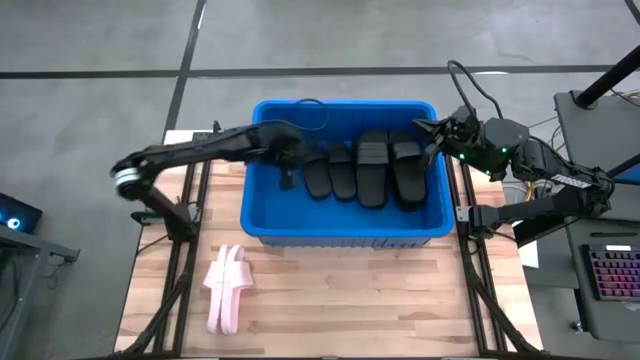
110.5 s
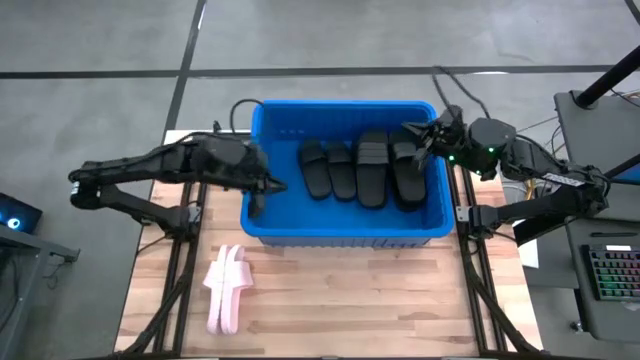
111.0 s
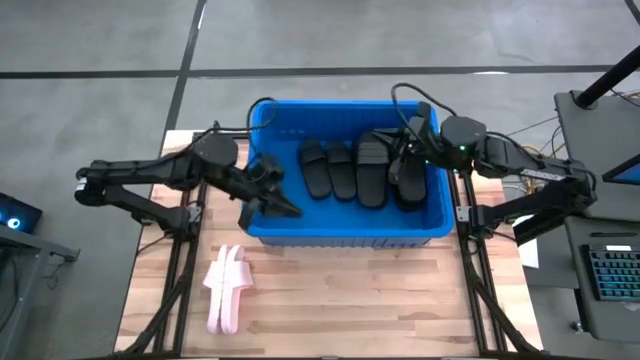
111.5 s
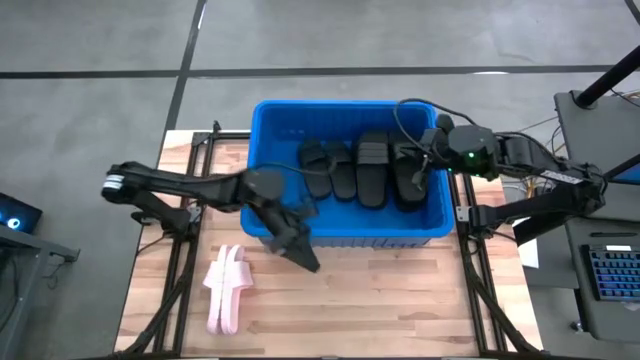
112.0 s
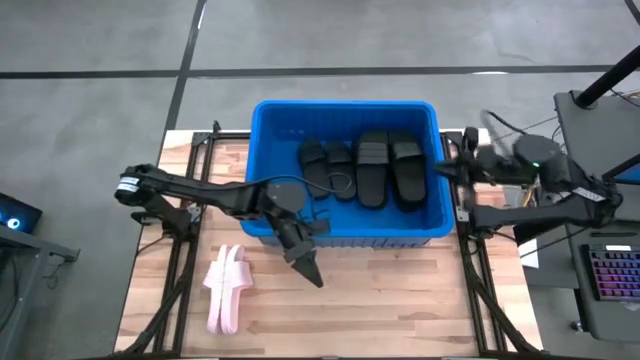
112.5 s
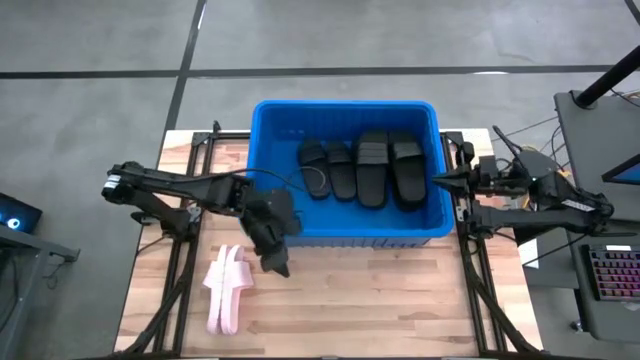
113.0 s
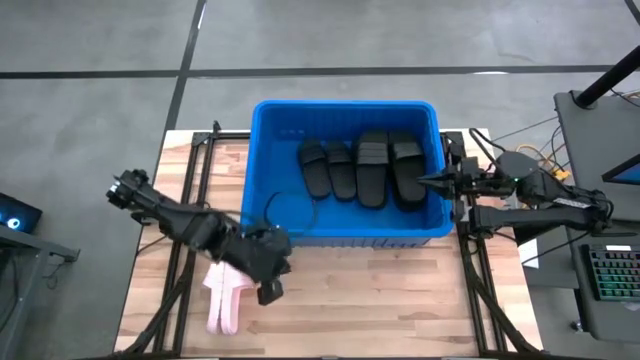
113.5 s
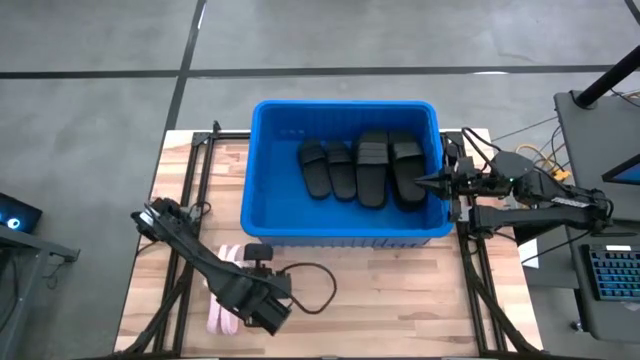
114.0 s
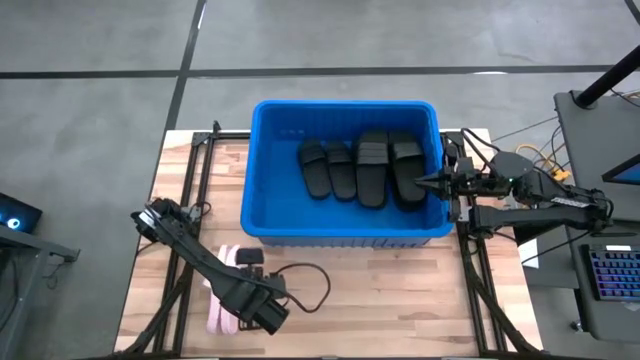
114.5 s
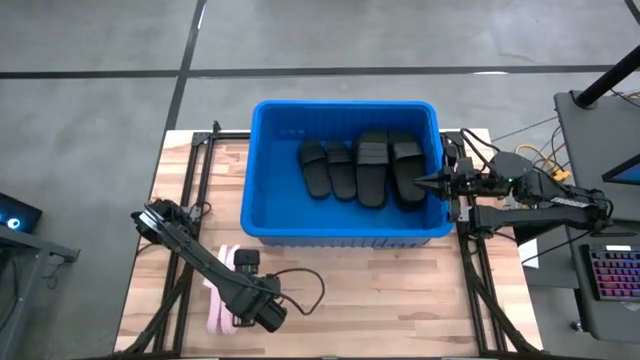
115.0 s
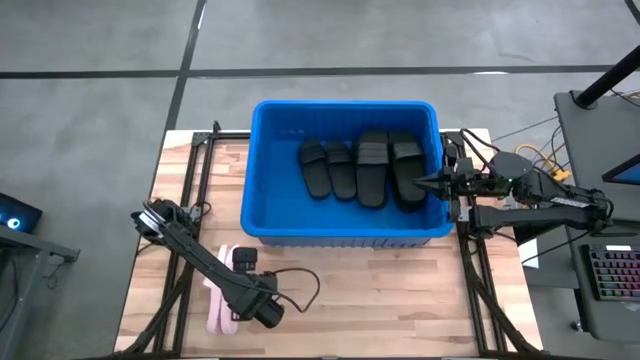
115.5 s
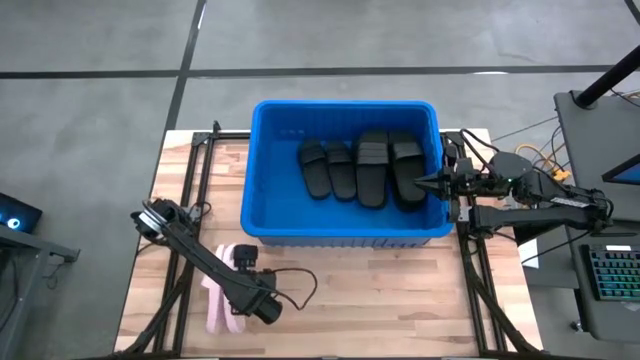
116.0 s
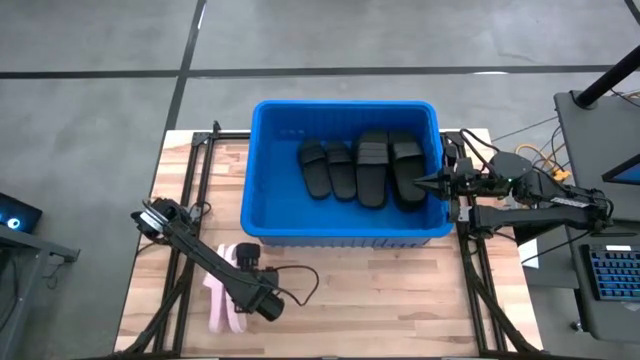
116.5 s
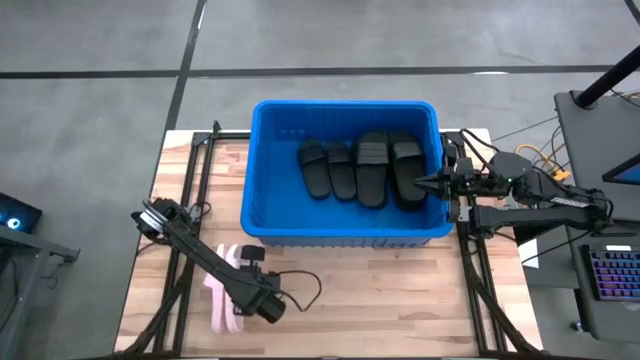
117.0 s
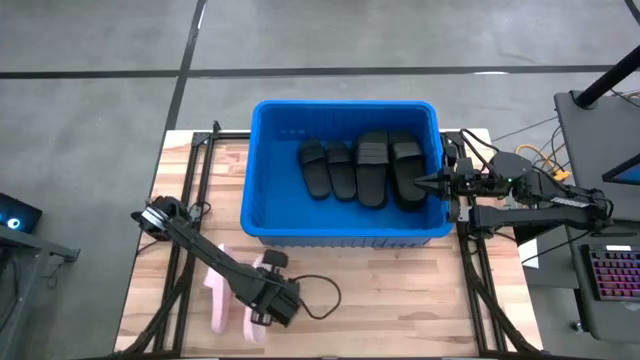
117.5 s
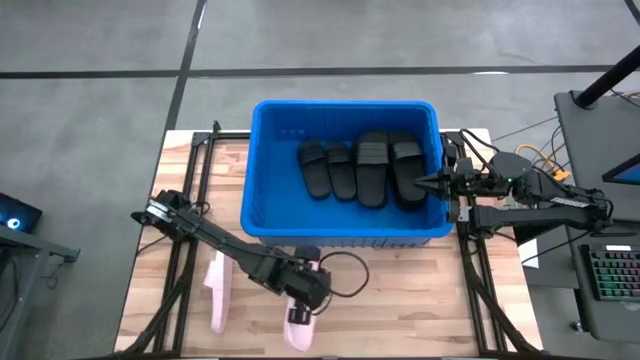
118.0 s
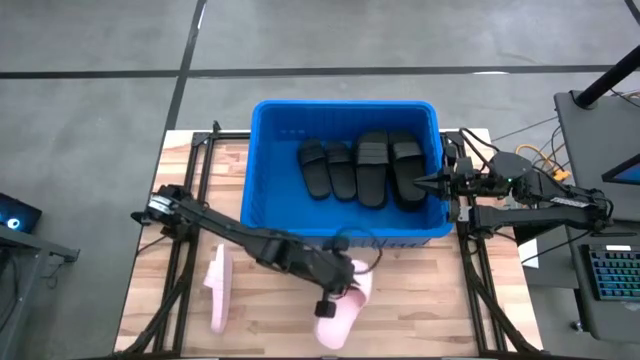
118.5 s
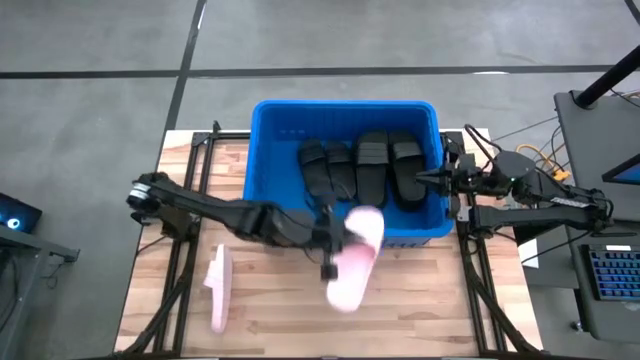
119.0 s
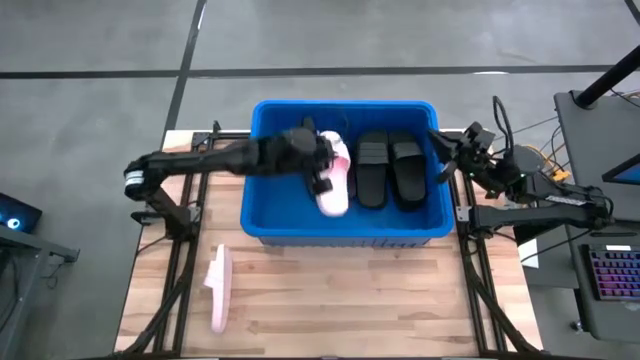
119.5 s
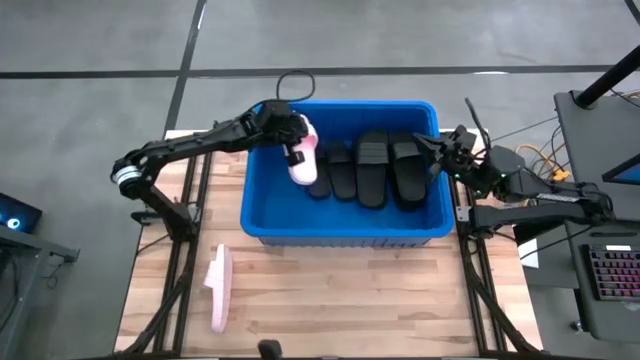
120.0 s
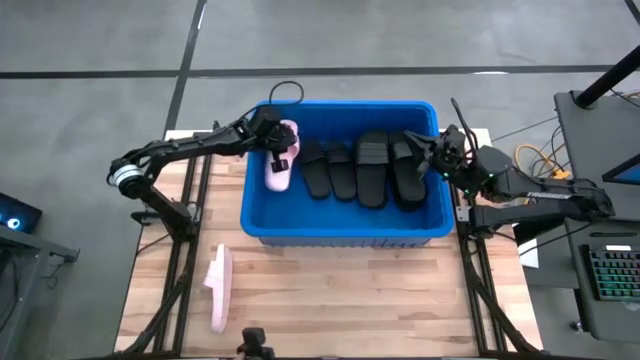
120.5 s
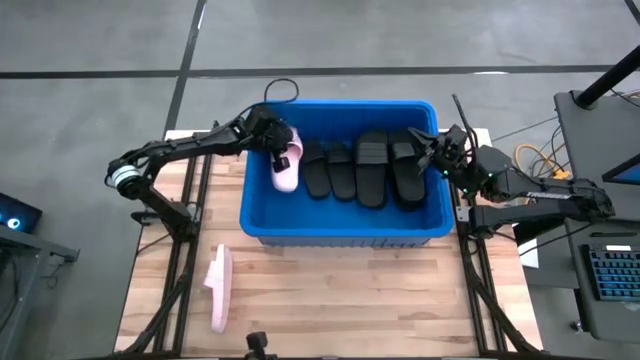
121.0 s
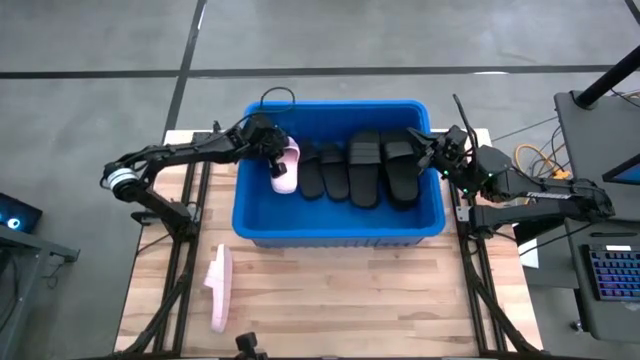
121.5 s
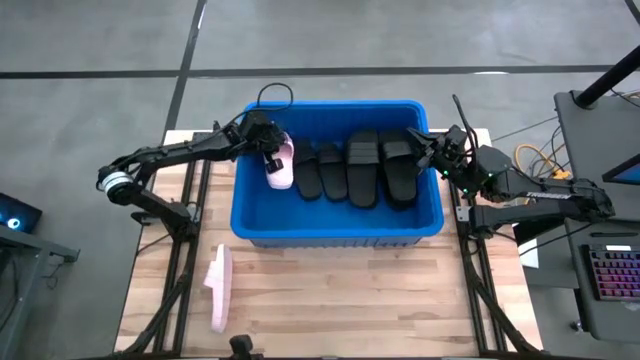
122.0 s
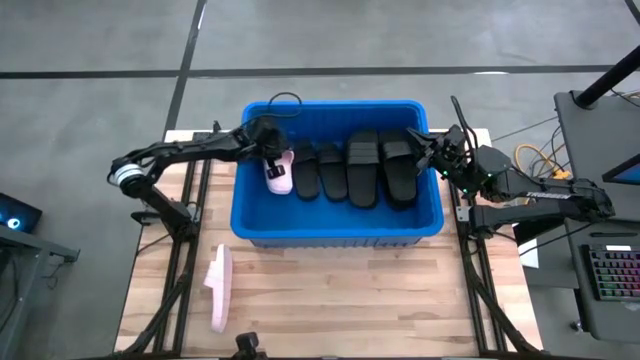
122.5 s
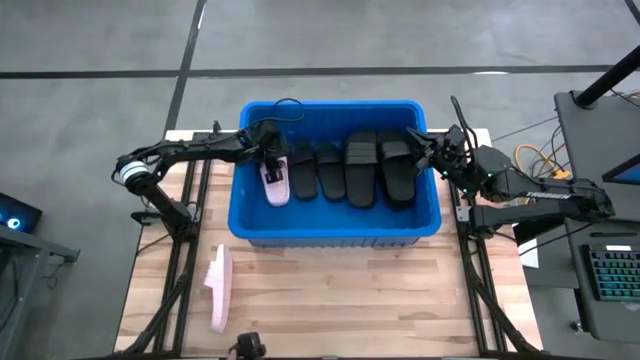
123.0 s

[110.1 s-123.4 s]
Task: Pick and place slides into bin
Put the right pink slide into the bin

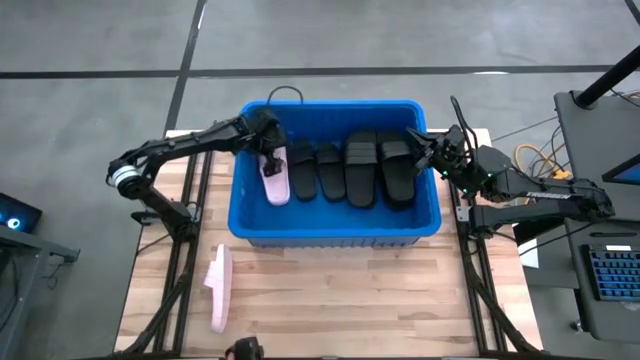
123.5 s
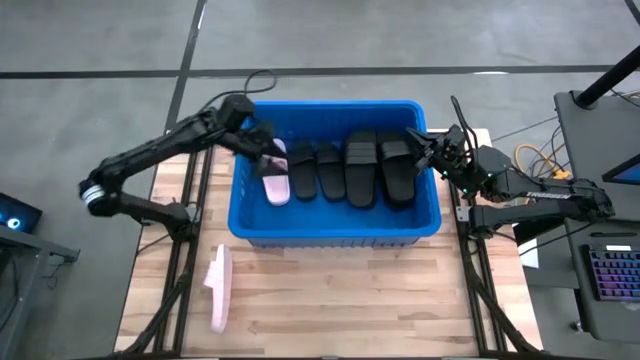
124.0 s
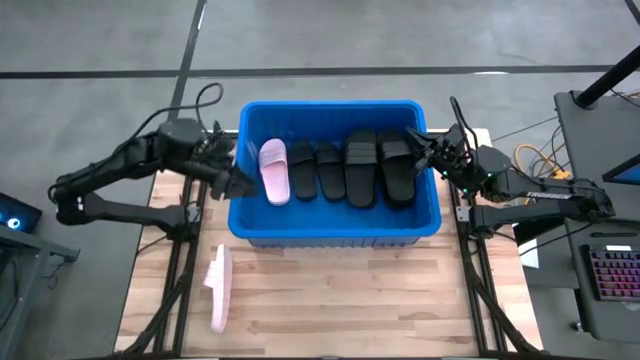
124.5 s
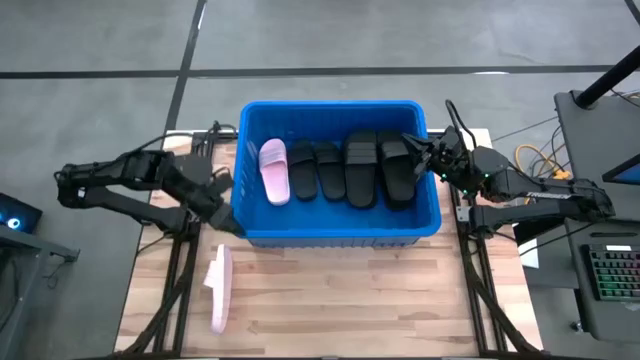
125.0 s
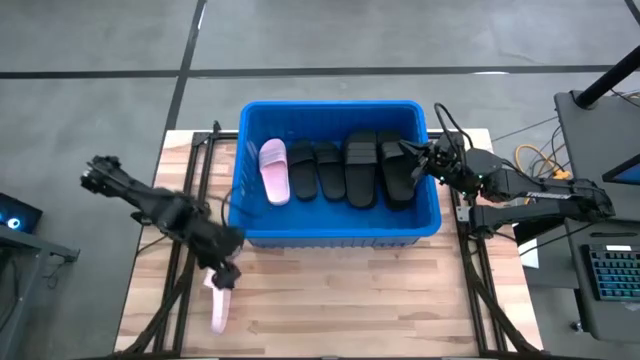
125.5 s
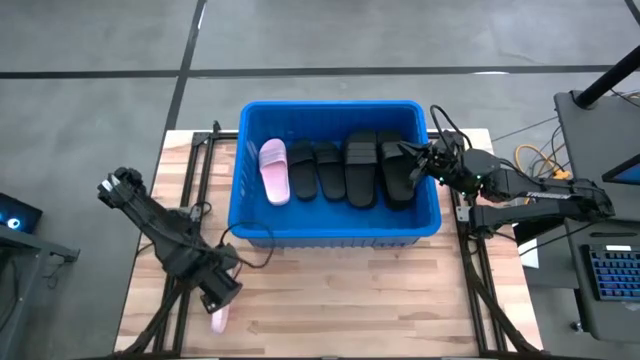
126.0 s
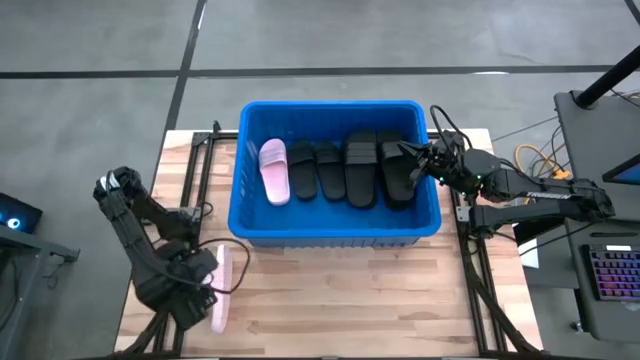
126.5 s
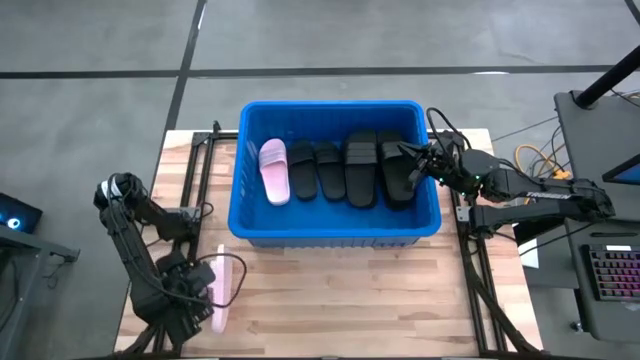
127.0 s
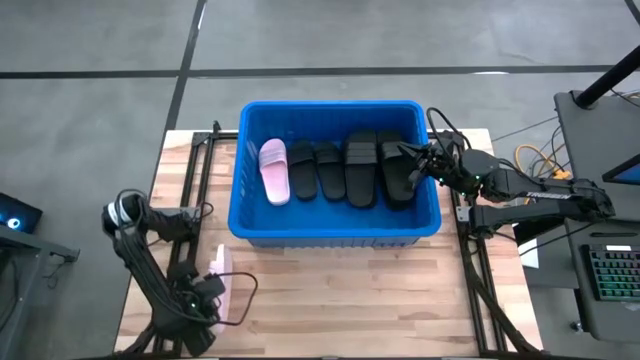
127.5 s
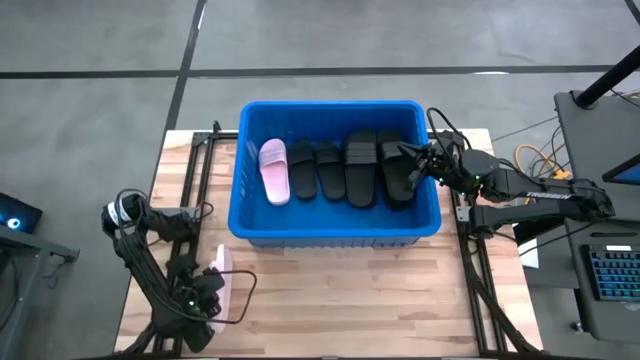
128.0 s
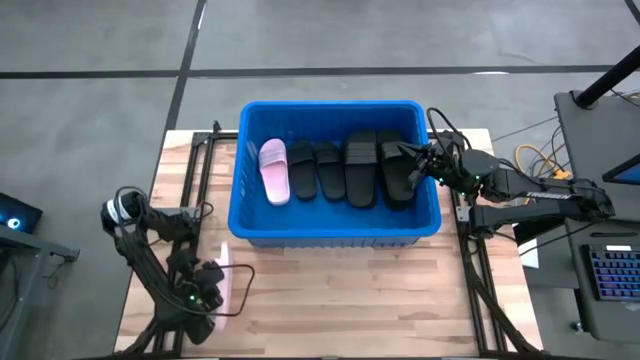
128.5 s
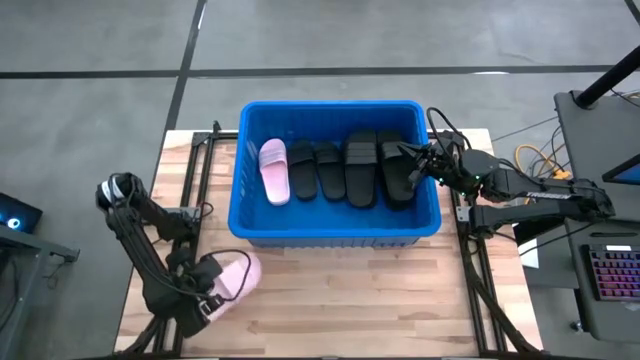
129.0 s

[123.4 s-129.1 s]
Put the pink slide into the bin
